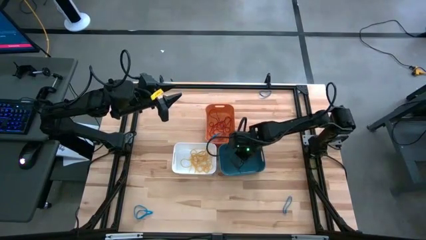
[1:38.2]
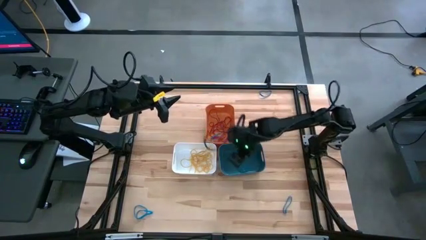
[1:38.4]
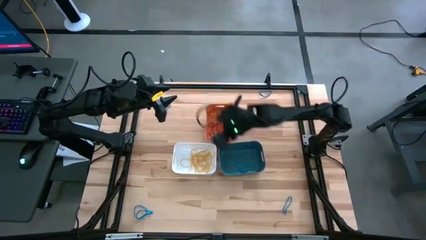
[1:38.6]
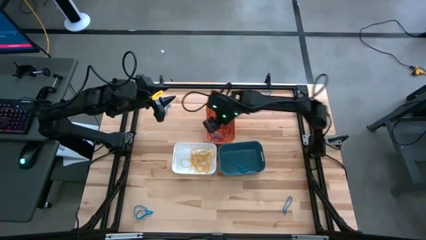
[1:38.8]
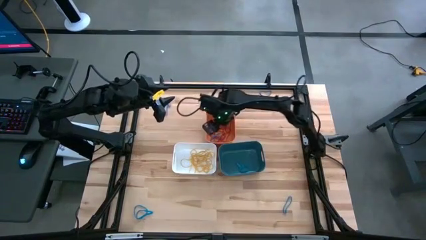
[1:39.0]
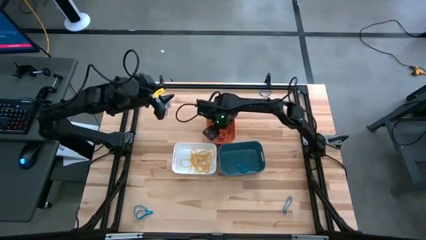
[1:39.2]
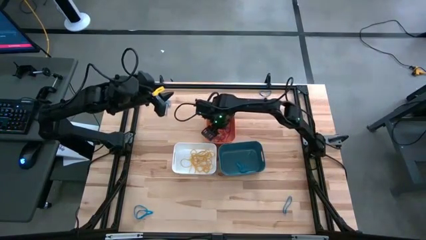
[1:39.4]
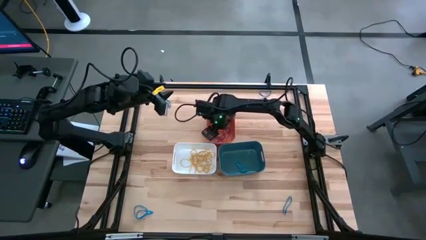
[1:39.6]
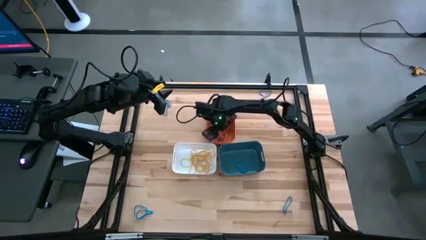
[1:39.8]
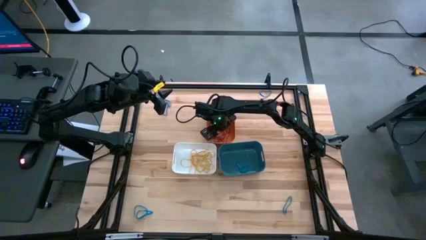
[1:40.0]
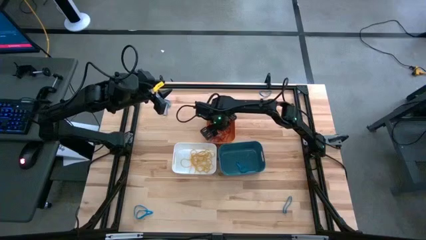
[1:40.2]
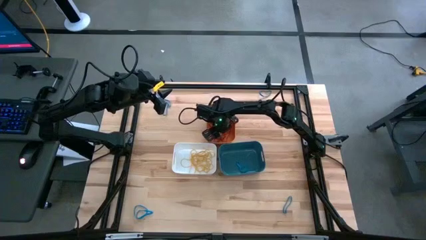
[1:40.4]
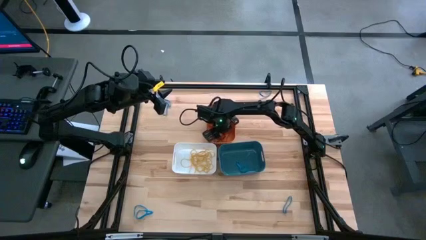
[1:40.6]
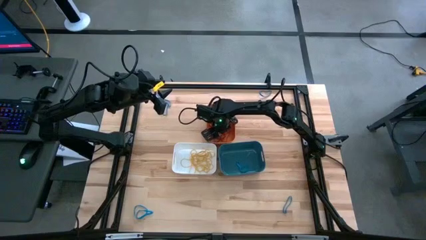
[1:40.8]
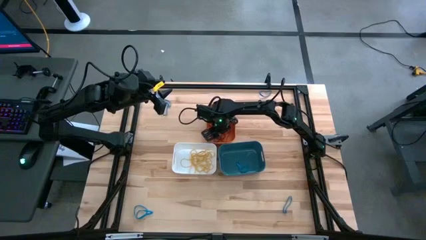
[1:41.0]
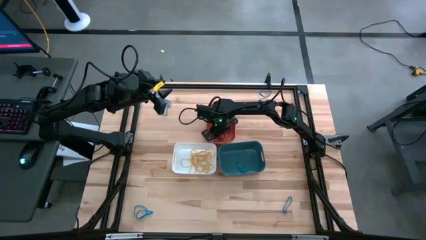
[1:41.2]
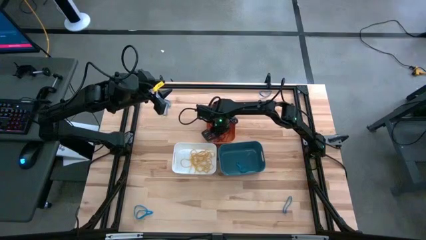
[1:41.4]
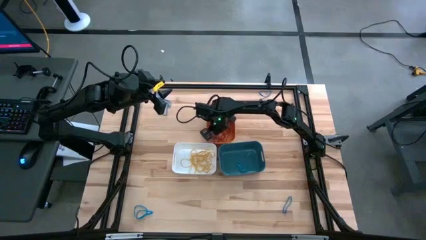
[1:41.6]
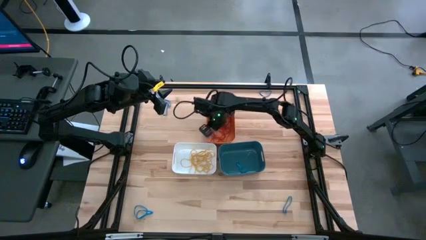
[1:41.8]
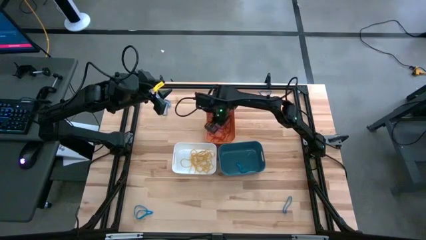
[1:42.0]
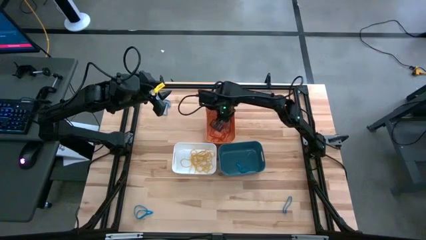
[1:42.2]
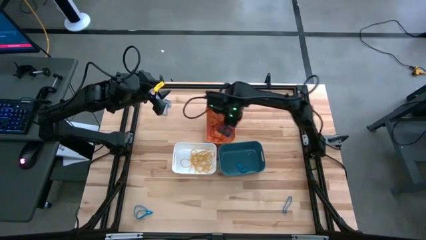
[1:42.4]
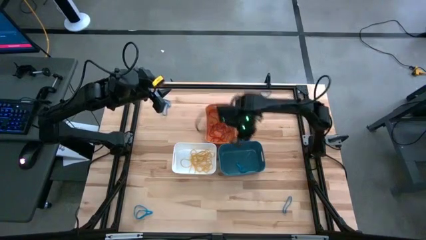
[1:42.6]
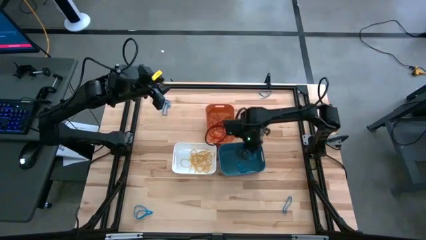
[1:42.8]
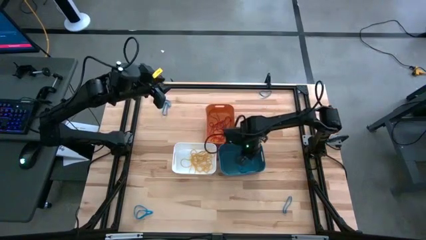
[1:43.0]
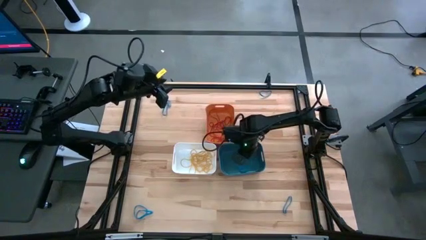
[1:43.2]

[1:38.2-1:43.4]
Task: Sort rubber bands into baskets
Put the blue rubber band into the blue bin

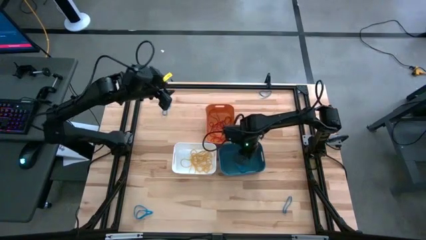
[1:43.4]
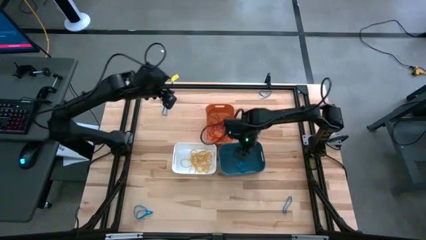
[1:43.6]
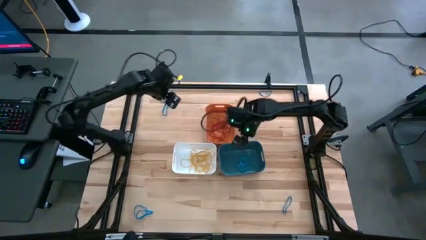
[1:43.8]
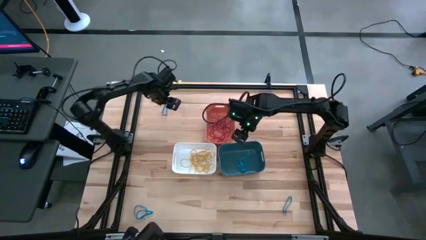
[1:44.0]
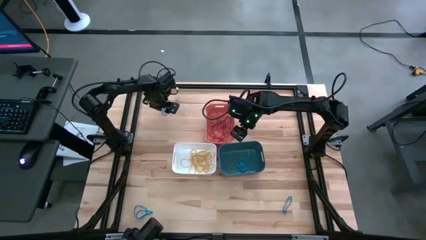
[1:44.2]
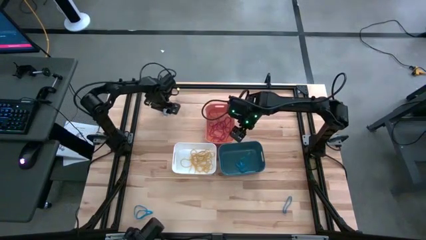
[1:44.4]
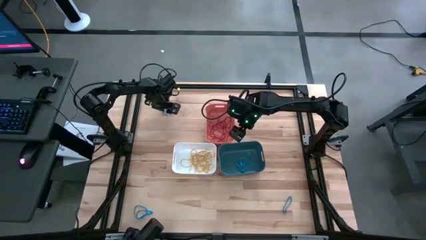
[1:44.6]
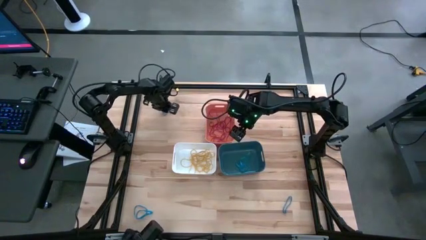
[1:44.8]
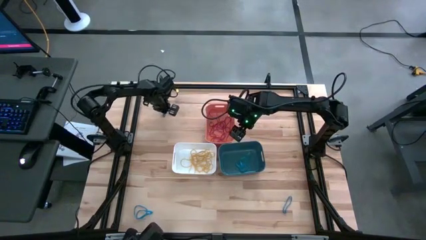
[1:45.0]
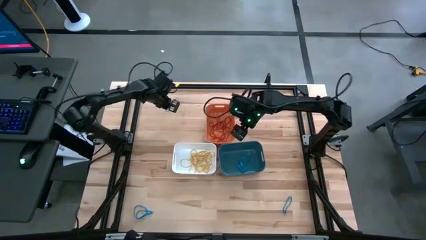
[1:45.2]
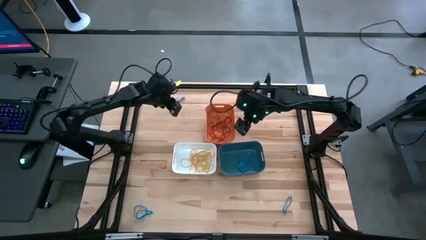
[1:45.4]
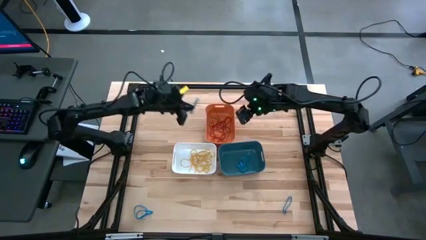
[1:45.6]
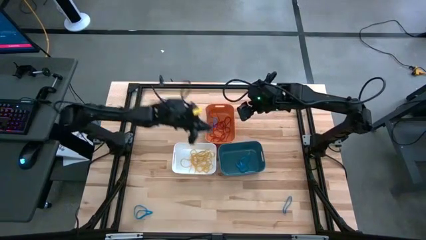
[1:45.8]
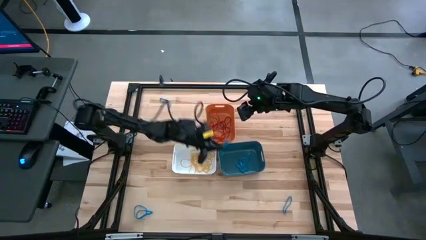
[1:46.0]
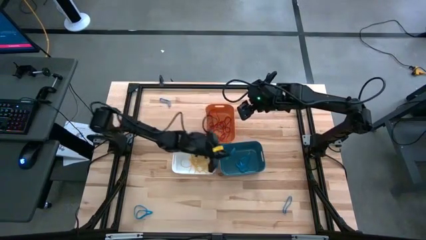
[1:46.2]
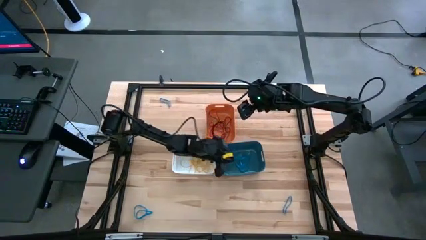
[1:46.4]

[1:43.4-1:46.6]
Put the blue rubber band into the blue bin

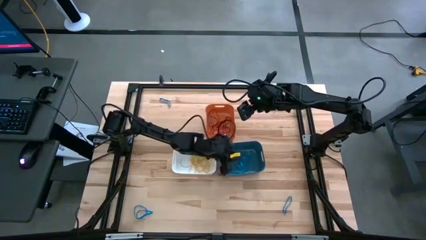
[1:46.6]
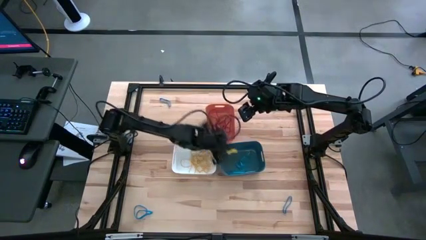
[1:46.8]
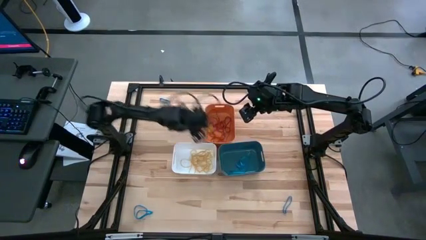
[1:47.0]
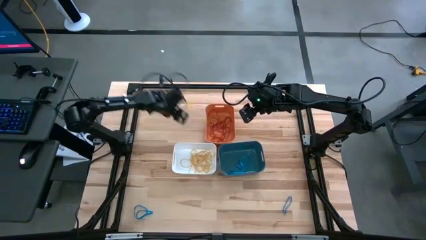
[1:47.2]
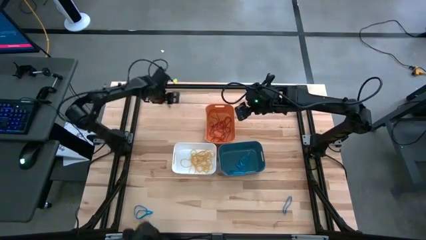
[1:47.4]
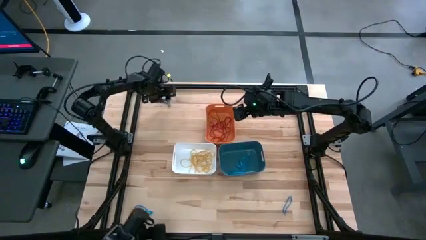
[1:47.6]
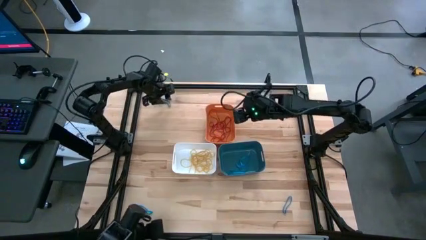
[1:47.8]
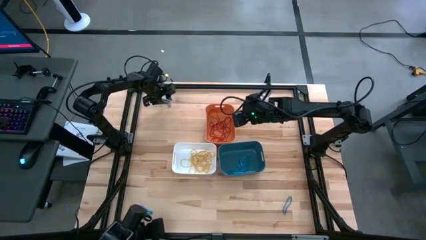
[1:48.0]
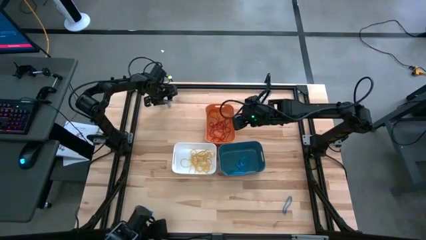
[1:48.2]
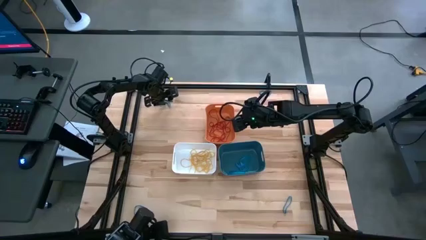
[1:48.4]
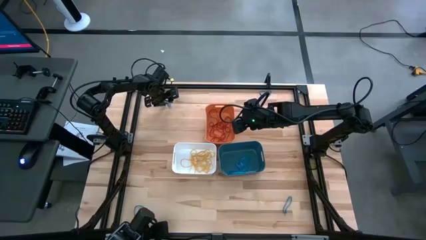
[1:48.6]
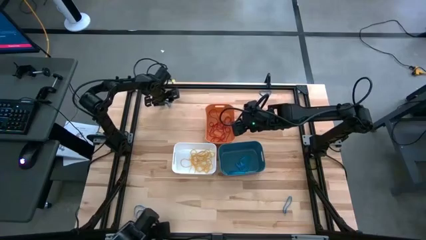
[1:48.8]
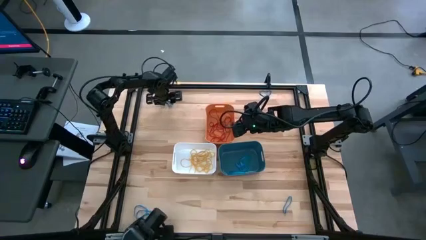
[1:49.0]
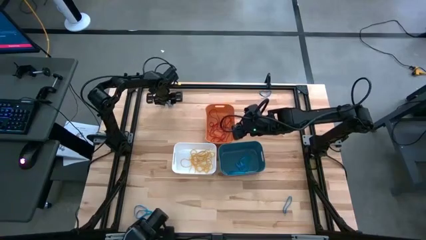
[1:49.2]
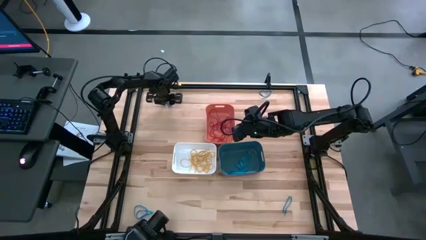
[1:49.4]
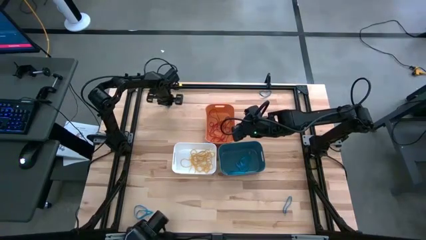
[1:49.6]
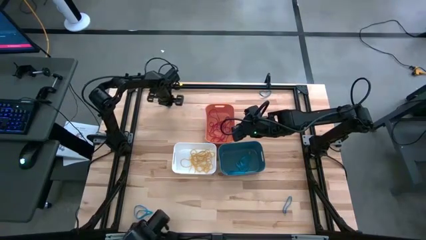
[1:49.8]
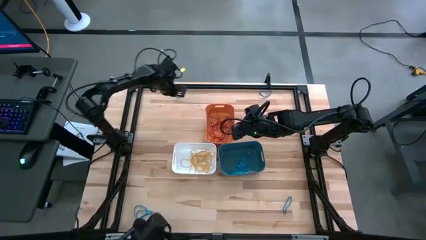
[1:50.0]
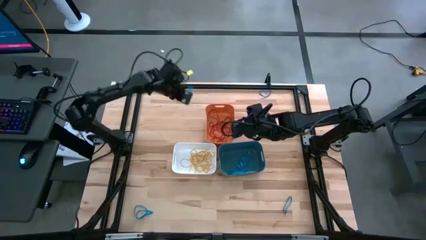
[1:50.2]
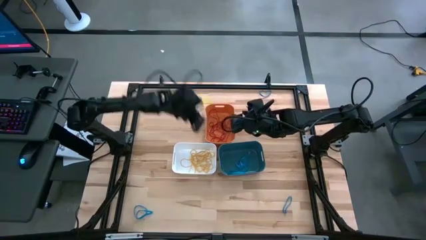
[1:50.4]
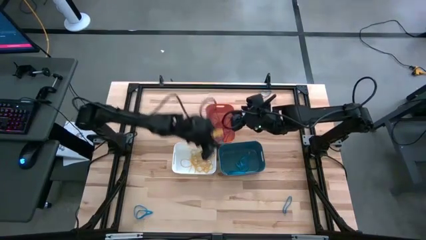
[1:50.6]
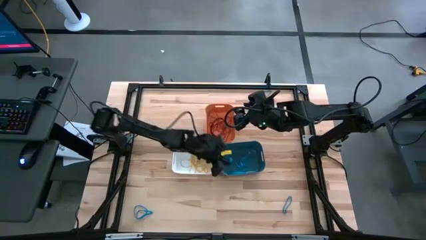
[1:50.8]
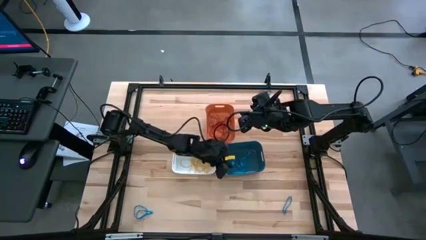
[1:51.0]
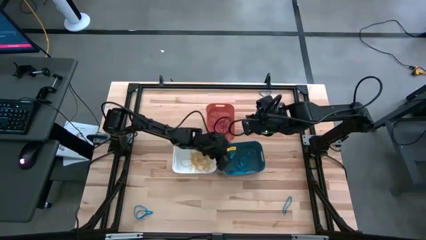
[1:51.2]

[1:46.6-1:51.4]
Put the blue rubber band into the blue bin

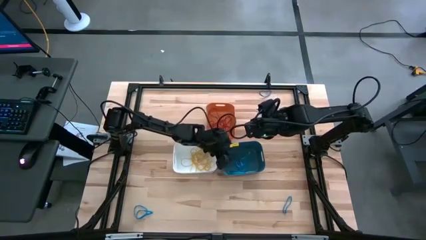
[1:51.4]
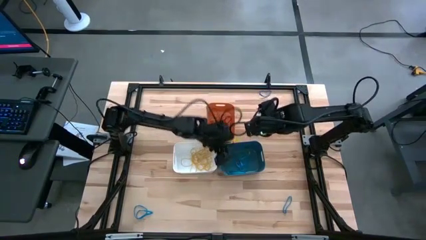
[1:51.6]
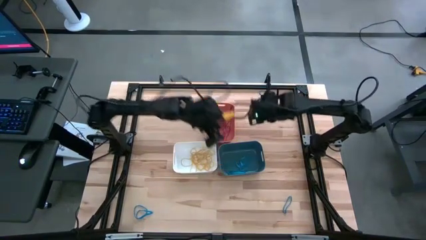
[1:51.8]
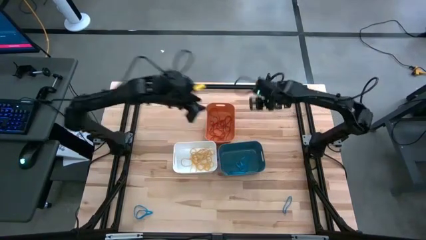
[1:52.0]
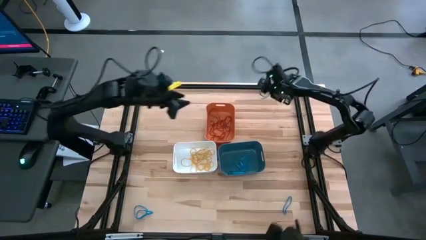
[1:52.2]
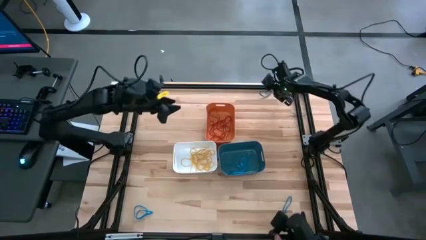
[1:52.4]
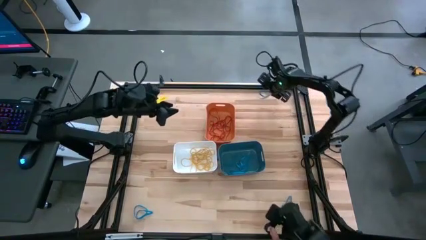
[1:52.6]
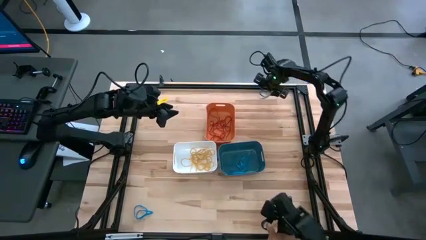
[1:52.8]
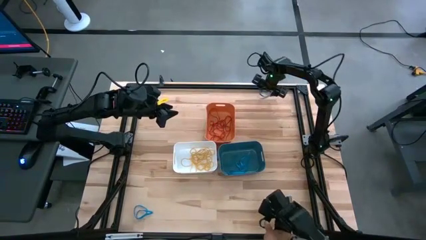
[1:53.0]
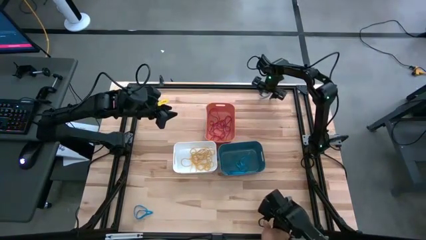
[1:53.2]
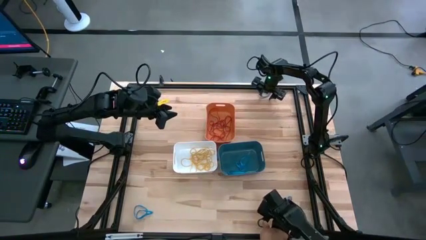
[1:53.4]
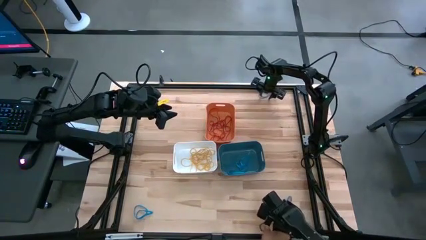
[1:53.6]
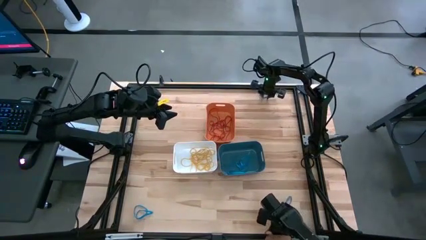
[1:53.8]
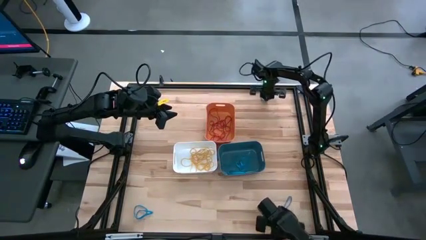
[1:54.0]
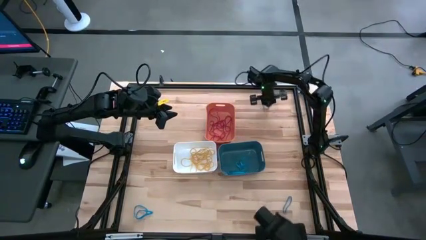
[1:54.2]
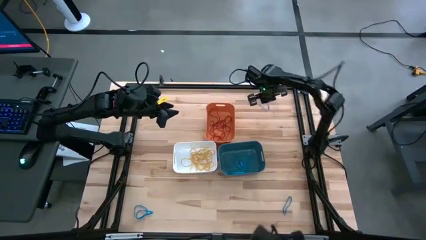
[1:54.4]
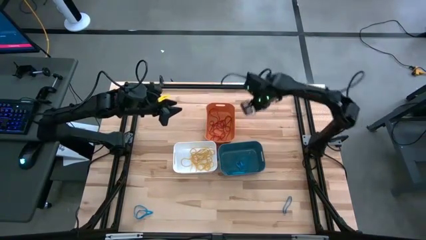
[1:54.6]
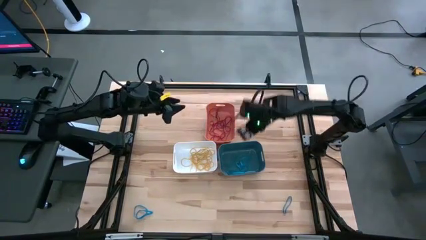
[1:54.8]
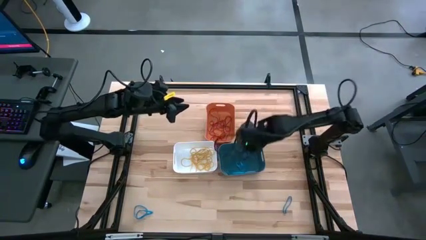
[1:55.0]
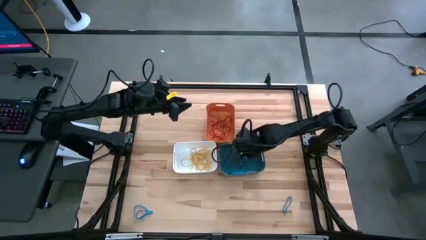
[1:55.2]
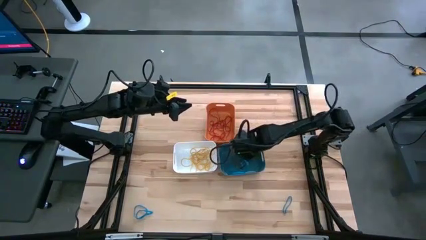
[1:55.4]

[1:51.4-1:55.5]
Put the blue rubber band into the blue bin
